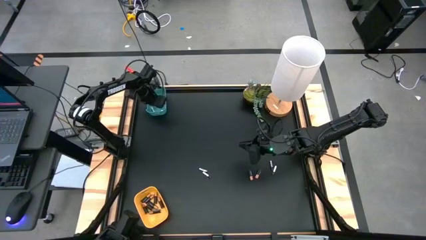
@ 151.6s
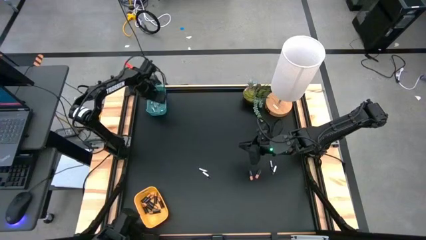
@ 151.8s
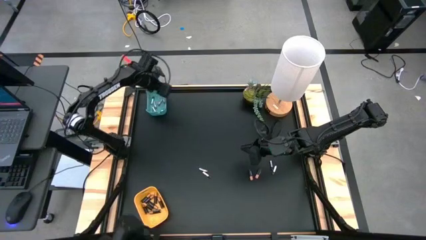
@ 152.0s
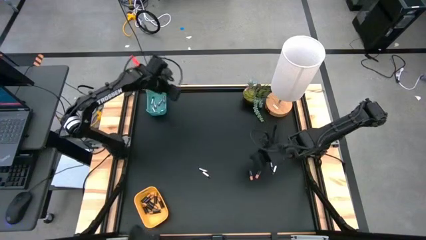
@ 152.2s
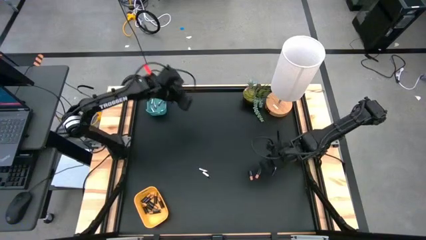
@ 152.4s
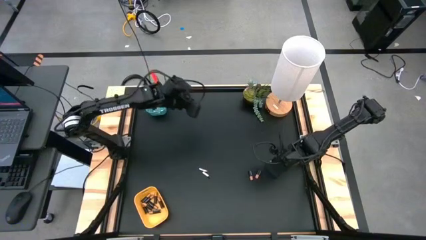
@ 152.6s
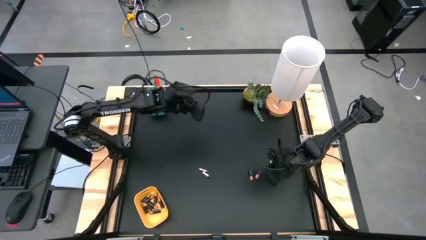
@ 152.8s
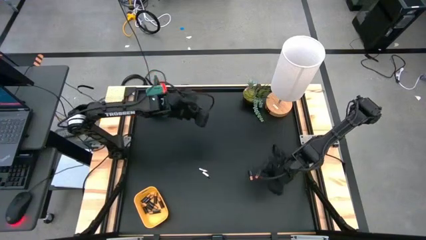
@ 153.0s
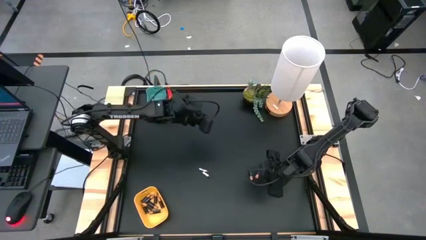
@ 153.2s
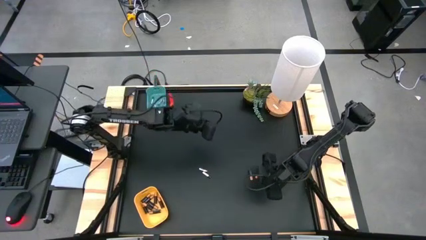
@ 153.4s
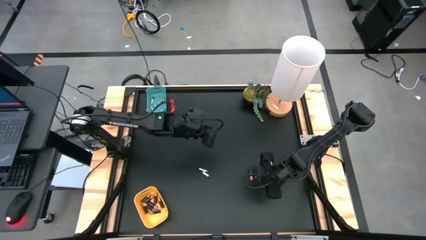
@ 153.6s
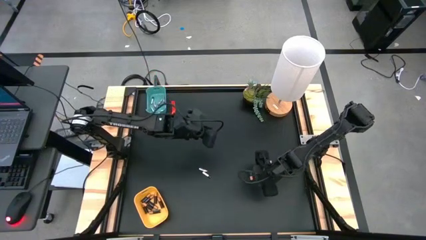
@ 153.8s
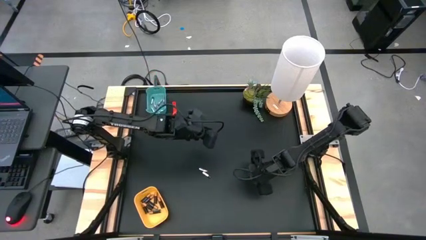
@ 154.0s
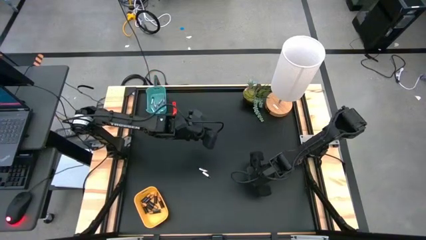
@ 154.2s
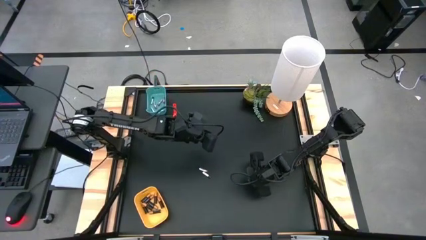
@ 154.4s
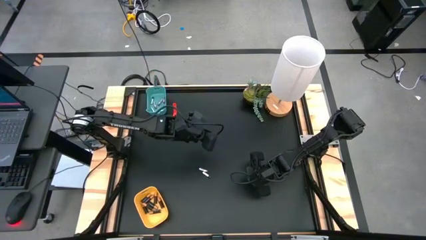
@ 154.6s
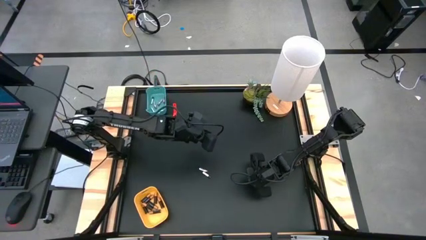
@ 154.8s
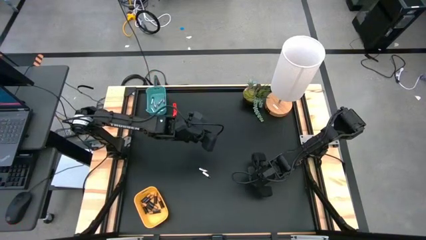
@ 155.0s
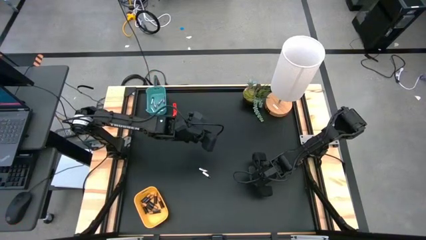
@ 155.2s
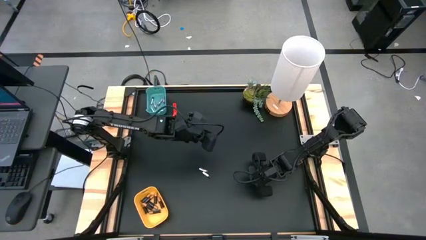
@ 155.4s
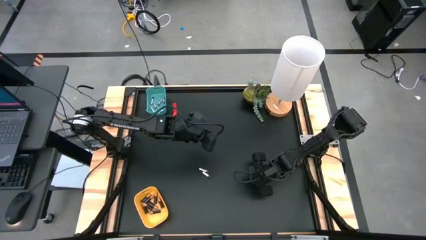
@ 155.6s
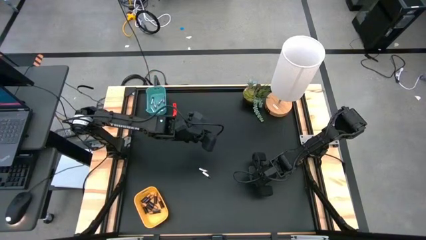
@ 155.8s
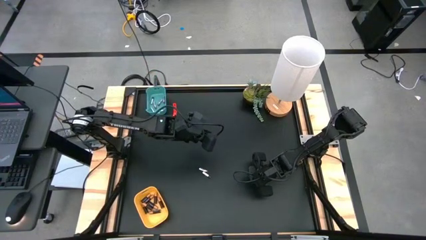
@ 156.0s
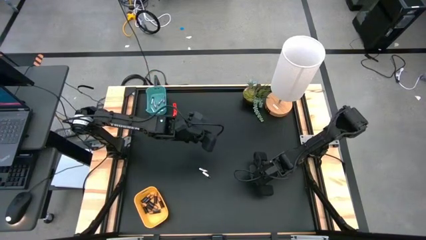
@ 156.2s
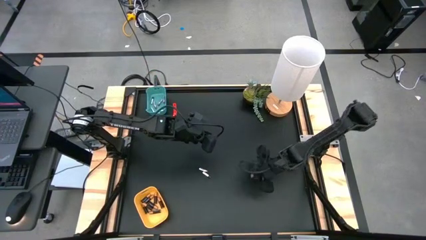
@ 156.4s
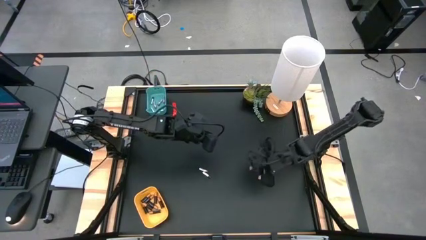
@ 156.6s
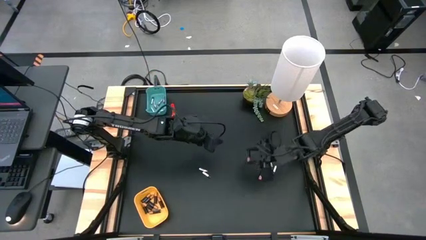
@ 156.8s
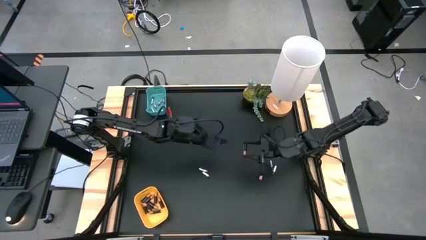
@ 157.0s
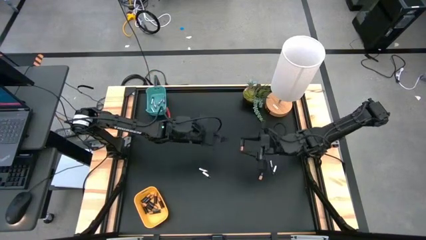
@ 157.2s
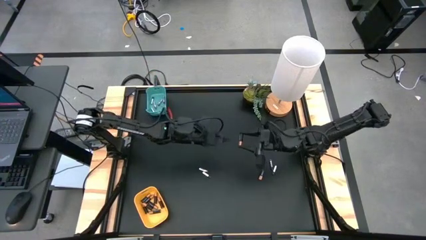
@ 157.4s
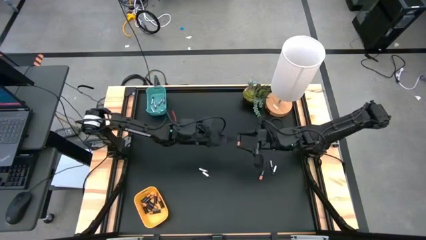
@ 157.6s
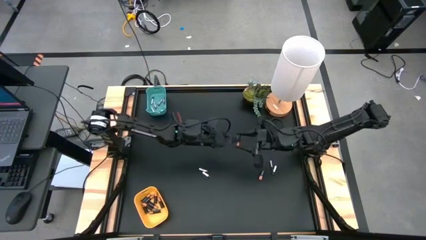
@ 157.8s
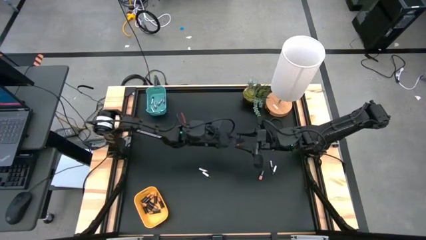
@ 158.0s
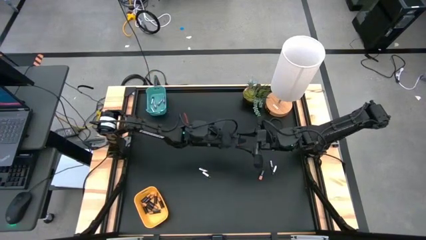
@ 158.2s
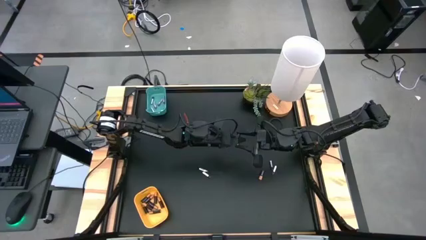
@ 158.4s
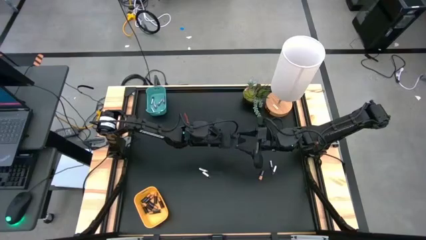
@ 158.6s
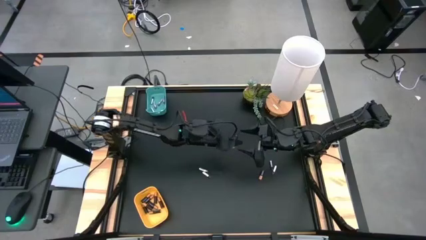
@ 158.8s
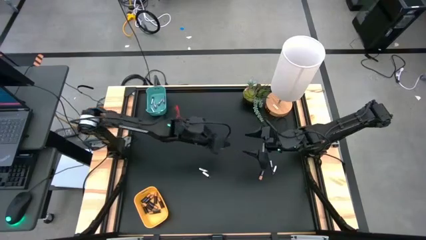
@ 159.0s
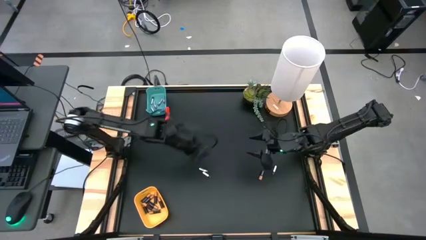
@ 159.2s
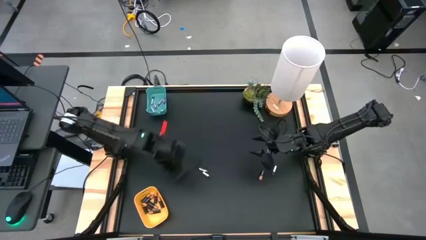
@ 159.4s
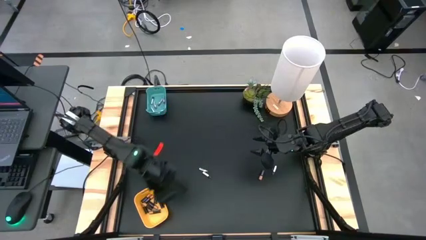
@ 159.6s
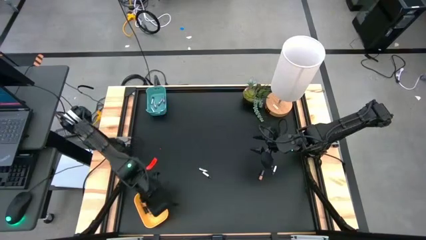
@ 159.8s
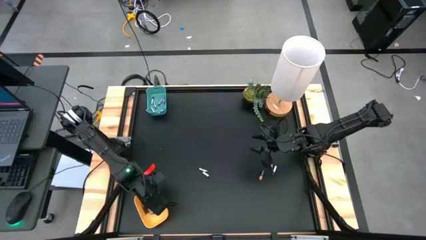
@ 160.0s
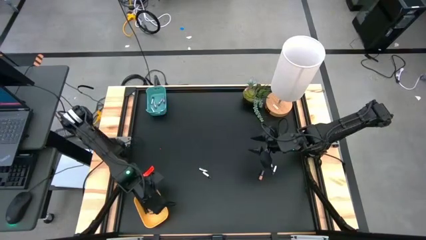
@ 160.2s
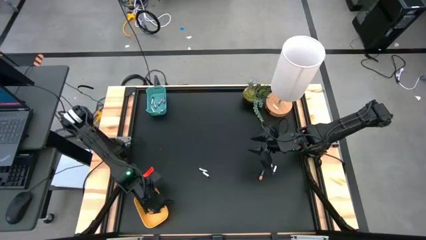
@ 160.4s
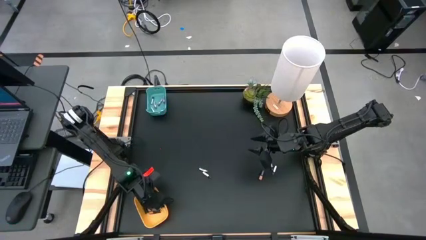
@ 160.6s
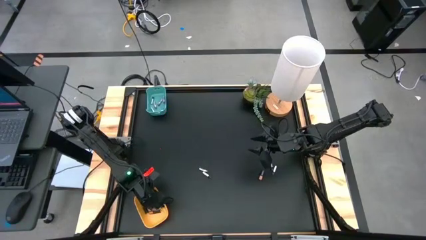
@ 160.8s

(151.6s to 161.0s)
Task: Sort batteries
Put the black battery into the yellow bin

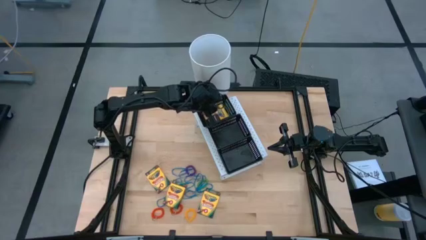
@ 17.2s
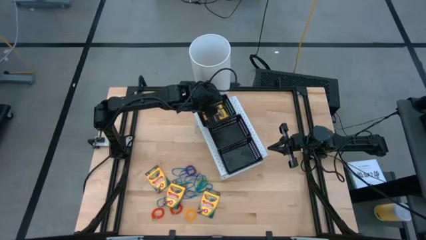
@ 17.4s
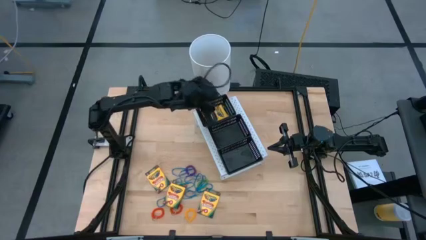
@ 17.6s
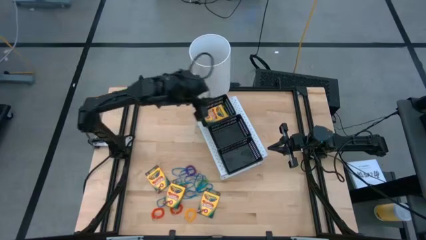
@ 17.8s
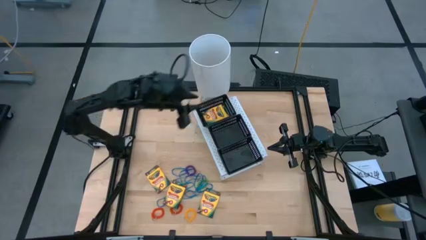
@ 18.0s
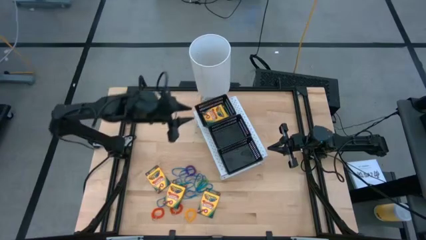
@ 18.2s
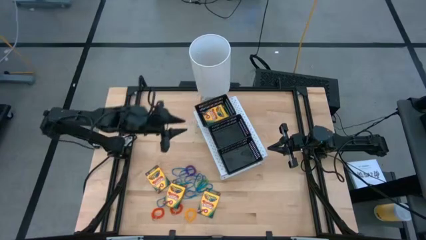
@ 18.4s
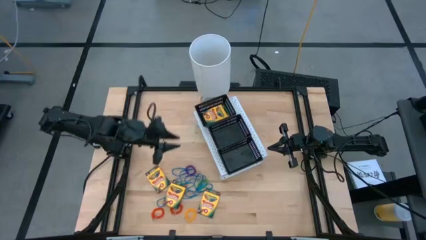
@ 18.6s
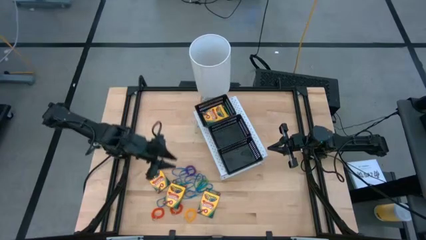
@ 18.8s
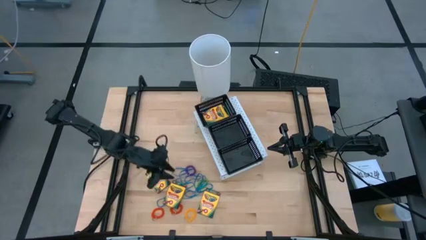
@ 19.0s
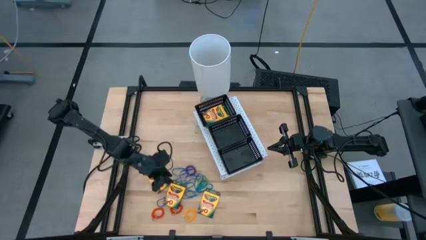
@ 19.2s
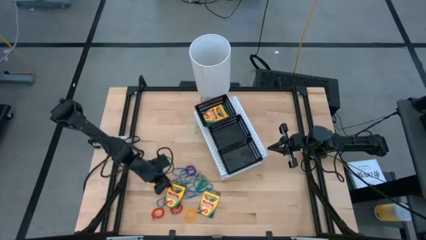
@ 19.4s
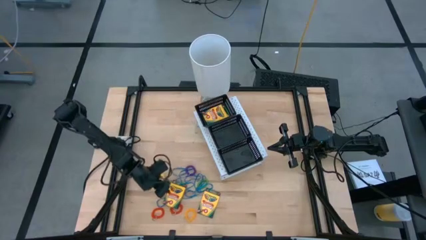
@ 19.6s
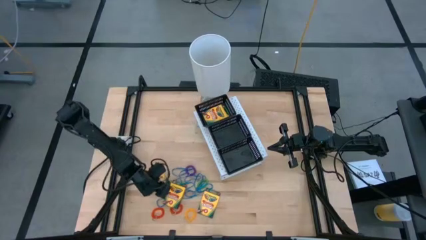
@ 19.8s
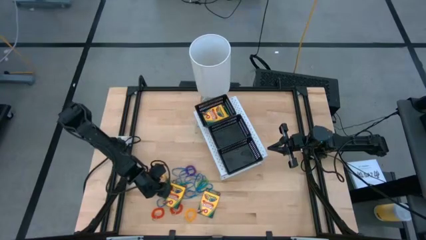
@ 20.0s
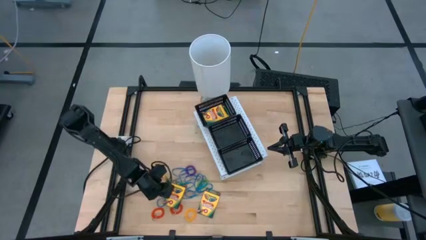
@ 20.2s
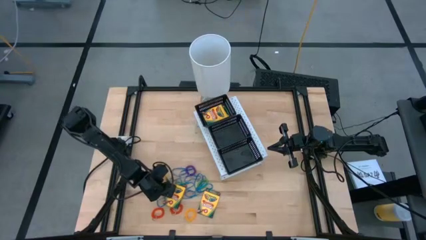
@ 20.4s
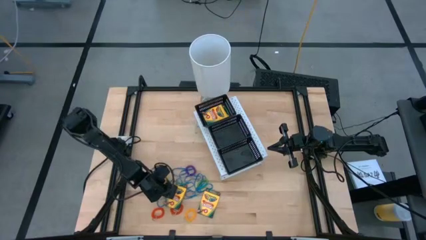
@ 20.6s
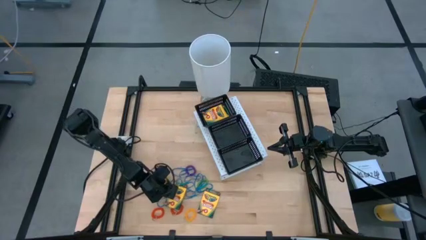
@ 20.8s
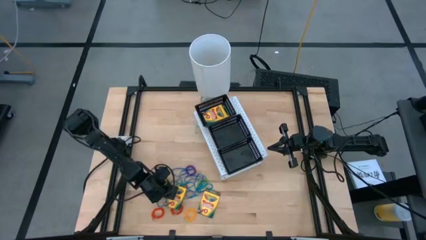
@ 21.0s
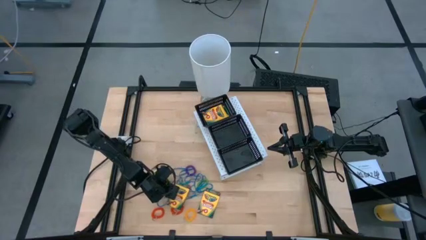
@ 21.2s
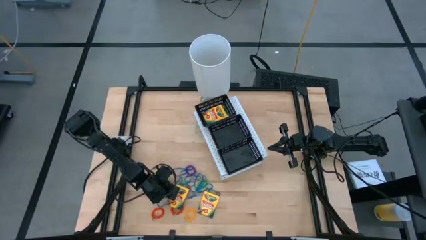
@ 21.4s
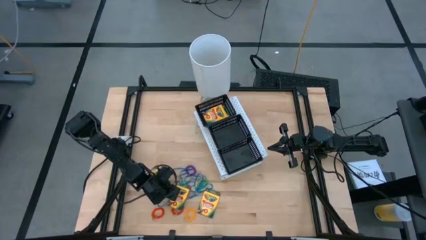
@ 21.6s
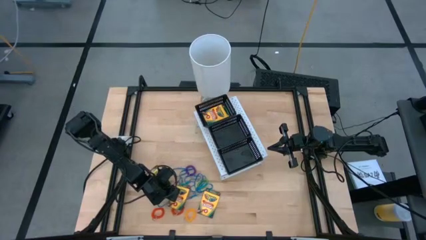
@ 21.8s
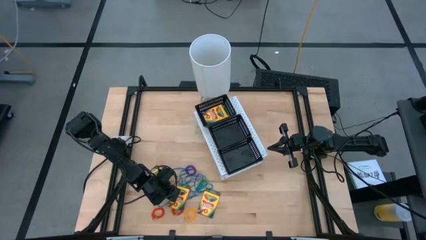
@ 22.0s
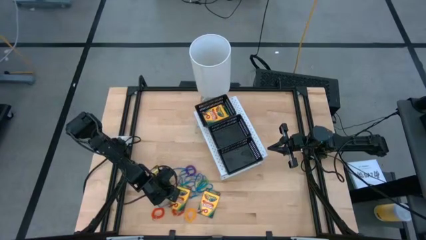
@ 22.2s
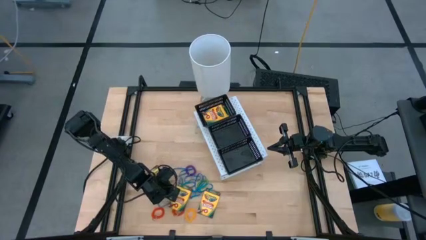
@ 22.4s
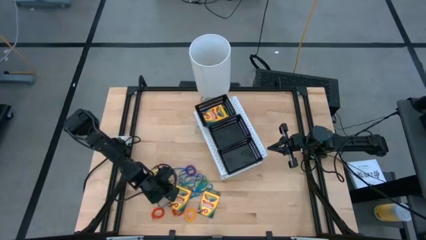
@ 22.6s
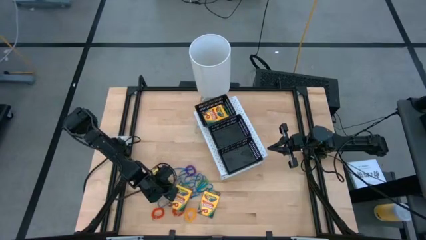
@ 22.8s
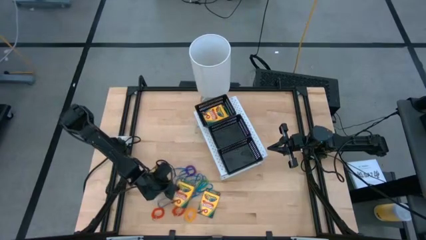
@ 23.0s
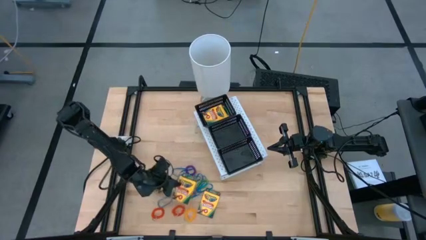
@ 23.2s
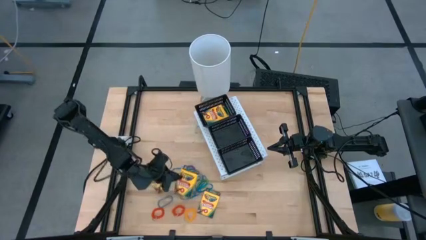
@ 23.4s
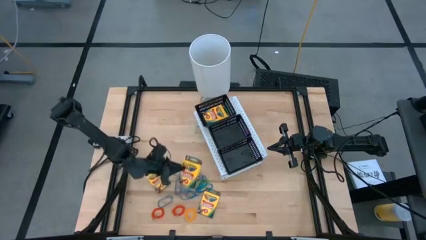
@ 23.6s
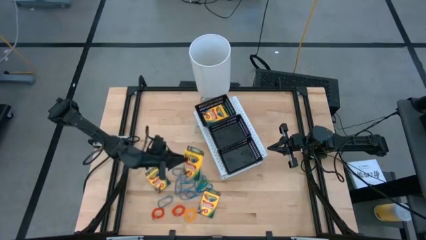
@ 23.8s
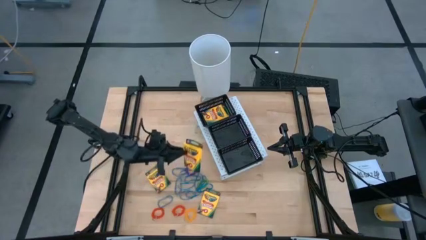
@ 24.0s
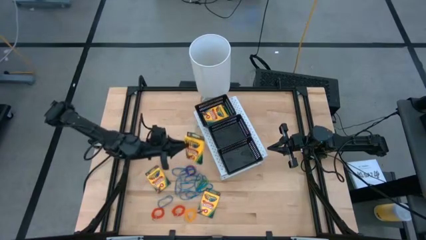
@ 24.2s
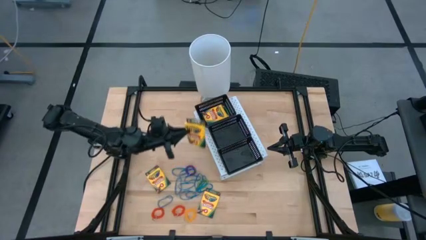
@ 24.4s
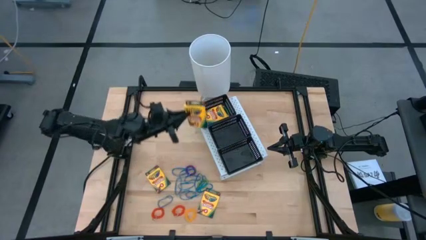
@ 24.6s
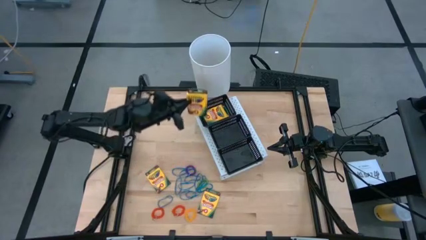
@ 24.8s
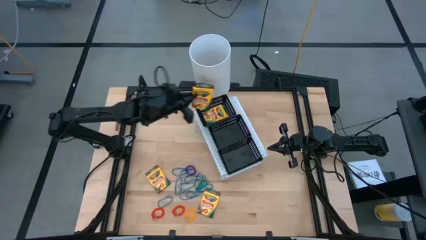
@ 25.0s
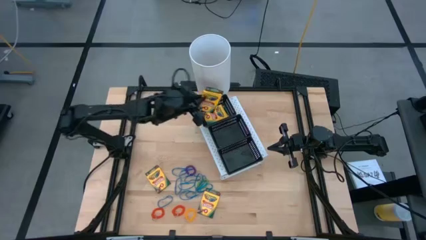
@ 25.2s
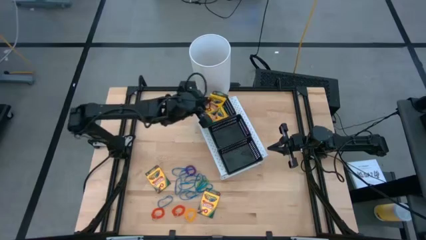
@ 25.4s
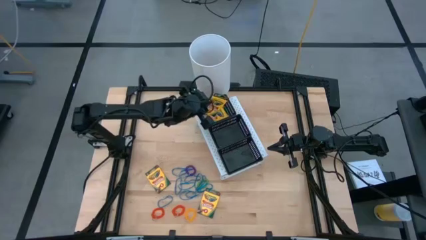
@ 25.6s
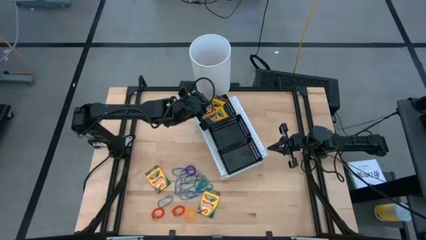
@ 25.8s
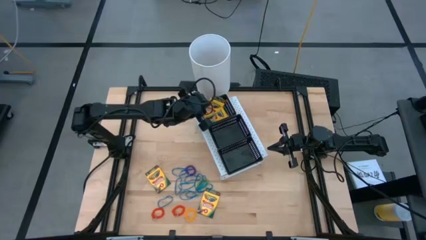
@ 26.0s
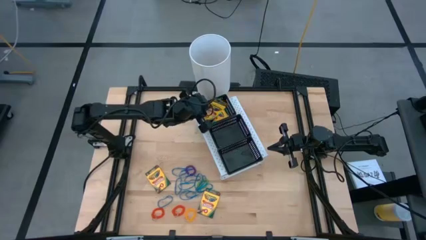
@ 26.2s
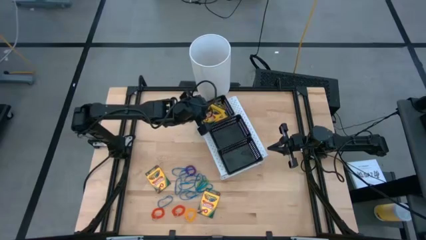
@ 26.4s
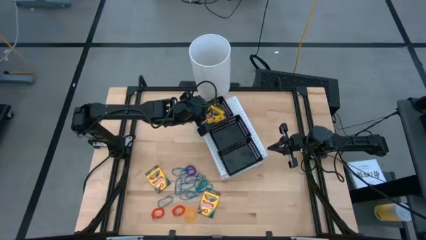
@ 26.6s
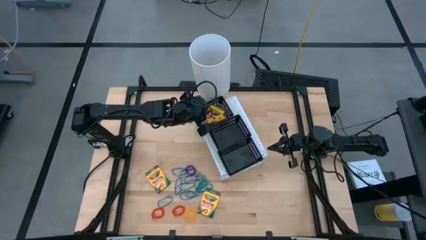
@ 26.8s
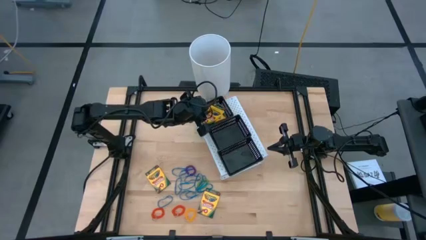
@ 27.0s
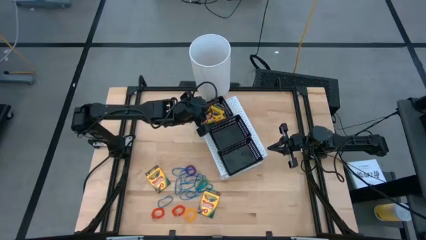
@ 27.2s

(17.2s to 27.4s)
Task: Pick & Place Office Desk Supplies
Put the crayon box into the top black bin on the shelf
